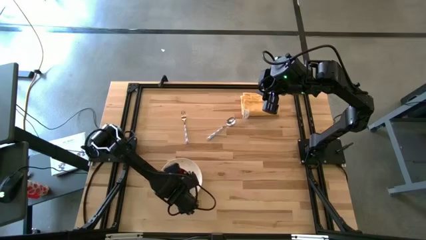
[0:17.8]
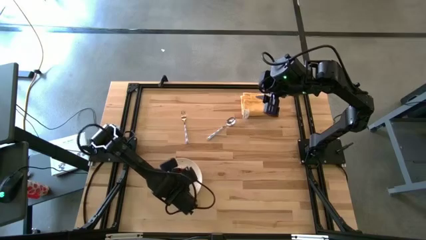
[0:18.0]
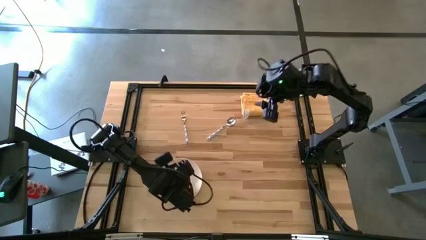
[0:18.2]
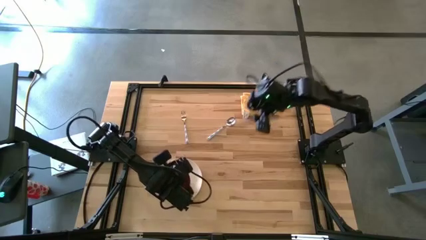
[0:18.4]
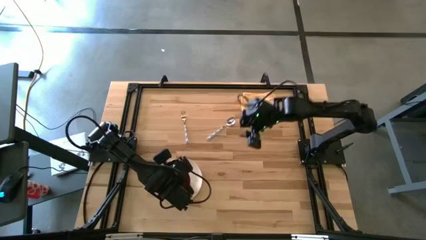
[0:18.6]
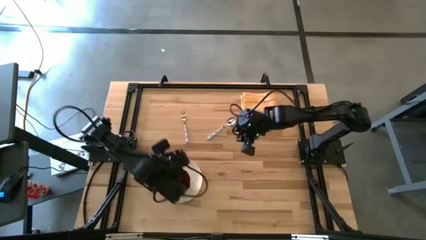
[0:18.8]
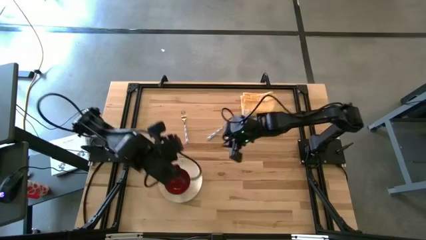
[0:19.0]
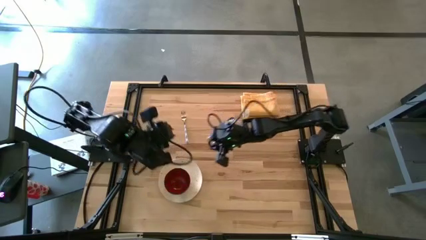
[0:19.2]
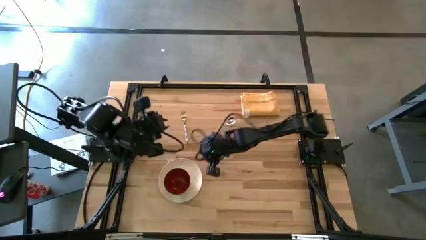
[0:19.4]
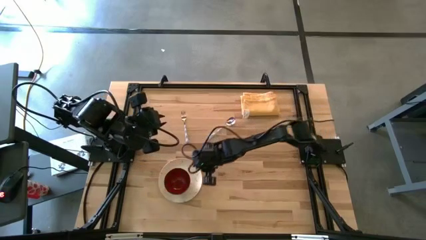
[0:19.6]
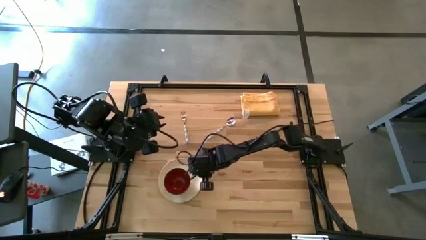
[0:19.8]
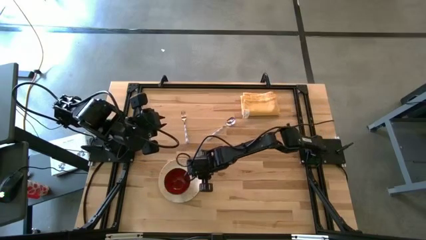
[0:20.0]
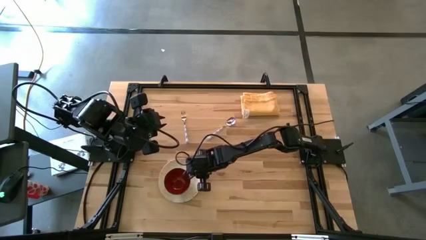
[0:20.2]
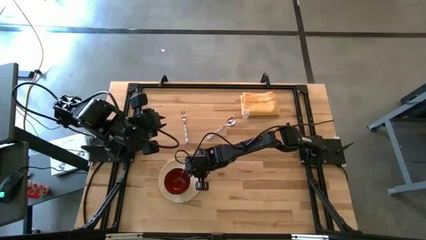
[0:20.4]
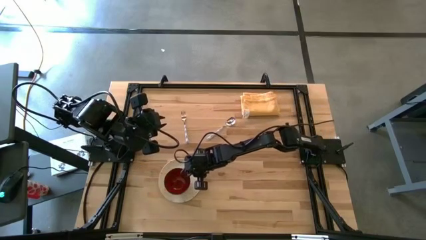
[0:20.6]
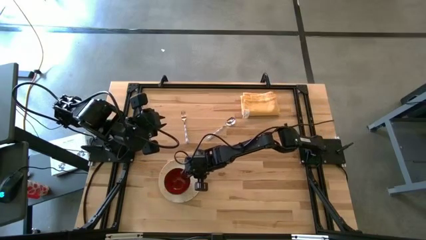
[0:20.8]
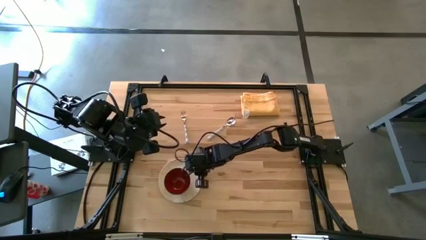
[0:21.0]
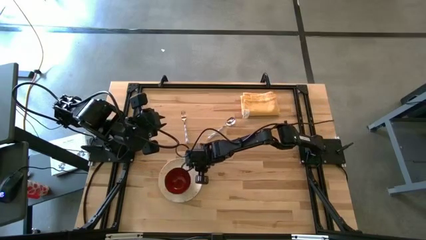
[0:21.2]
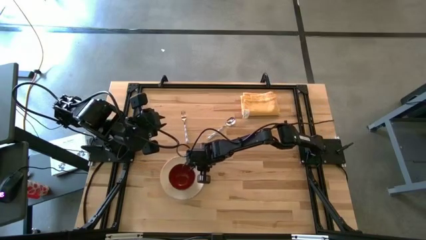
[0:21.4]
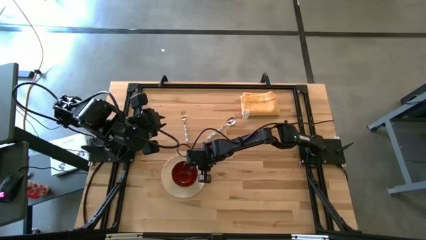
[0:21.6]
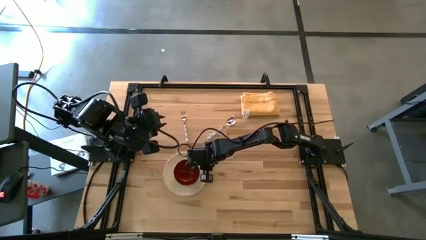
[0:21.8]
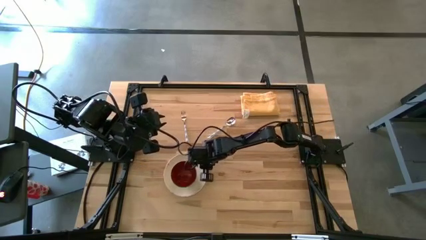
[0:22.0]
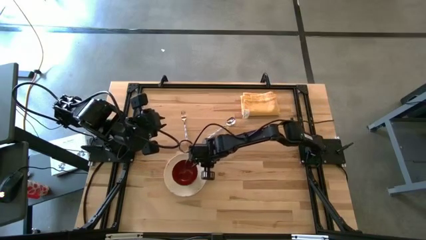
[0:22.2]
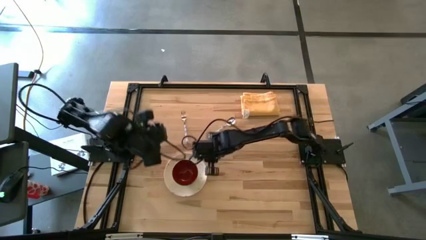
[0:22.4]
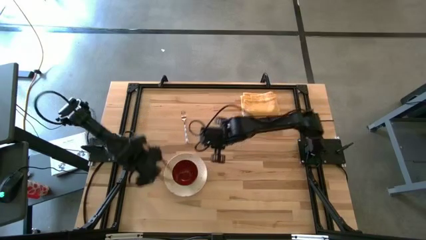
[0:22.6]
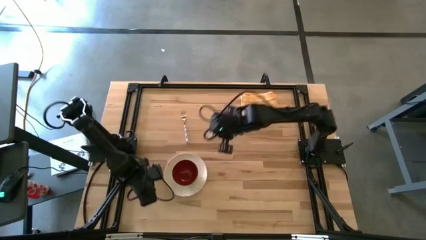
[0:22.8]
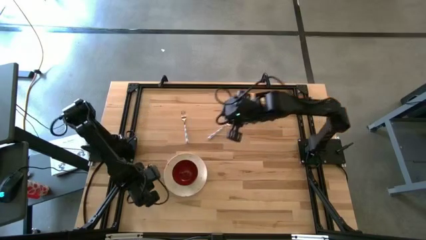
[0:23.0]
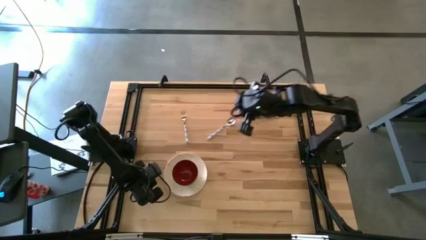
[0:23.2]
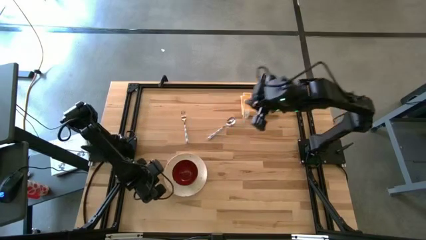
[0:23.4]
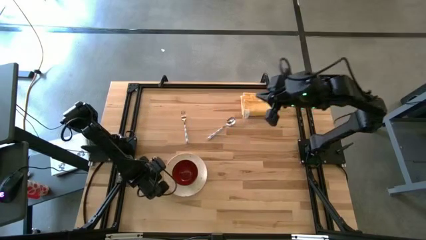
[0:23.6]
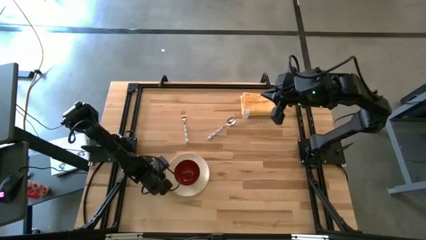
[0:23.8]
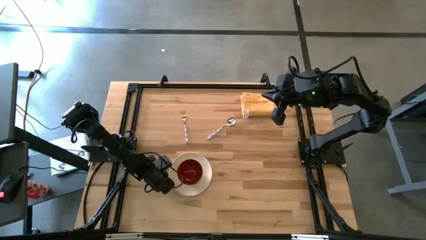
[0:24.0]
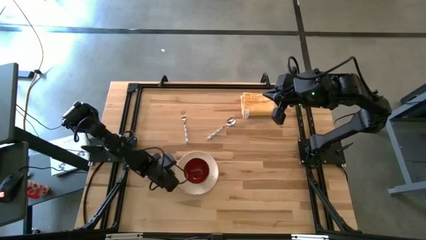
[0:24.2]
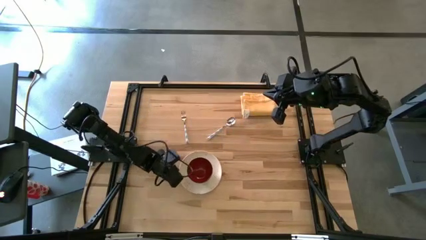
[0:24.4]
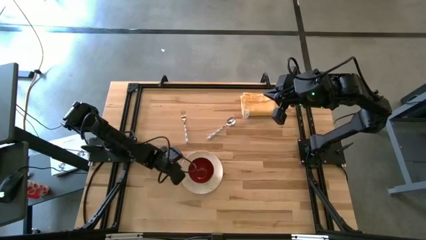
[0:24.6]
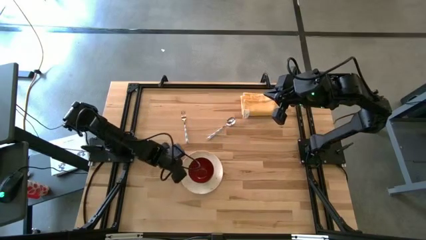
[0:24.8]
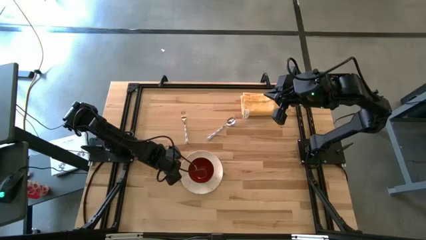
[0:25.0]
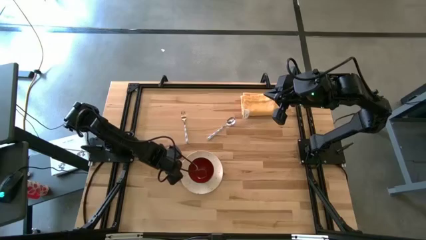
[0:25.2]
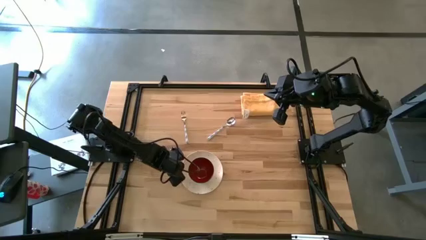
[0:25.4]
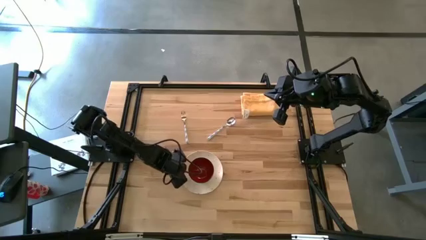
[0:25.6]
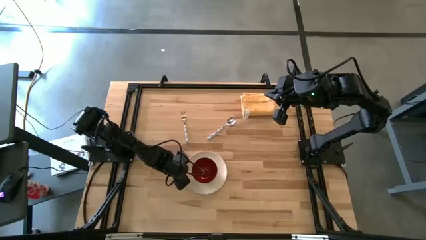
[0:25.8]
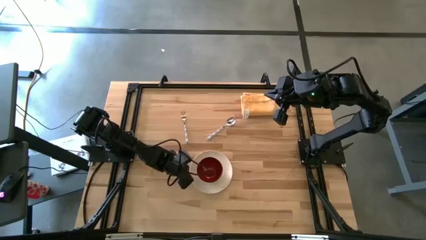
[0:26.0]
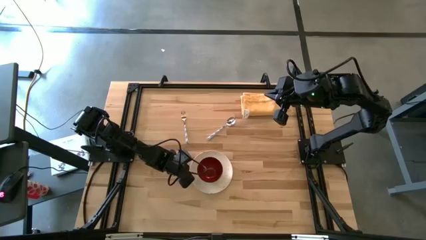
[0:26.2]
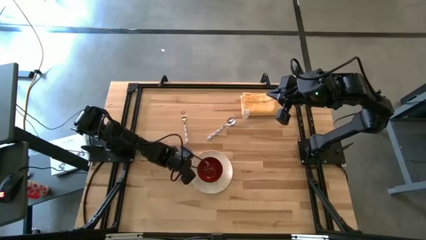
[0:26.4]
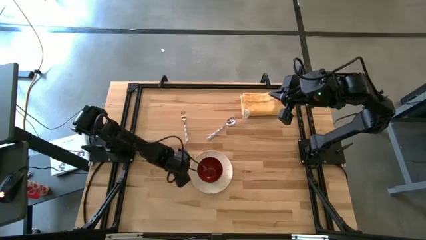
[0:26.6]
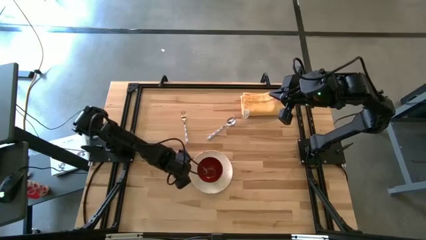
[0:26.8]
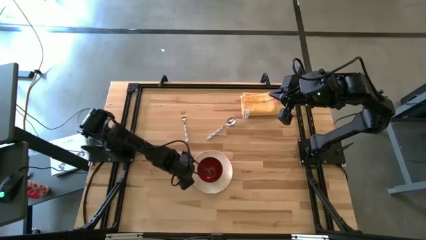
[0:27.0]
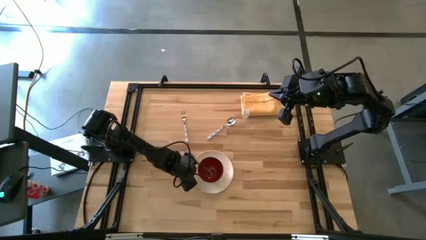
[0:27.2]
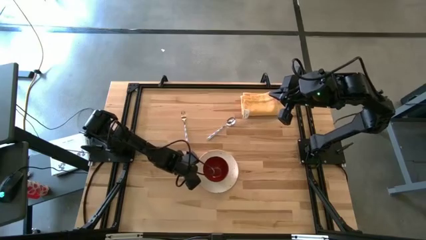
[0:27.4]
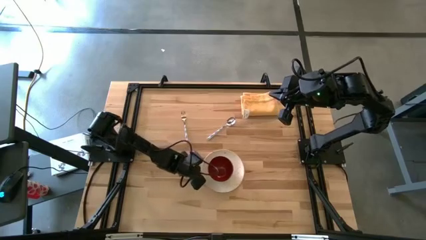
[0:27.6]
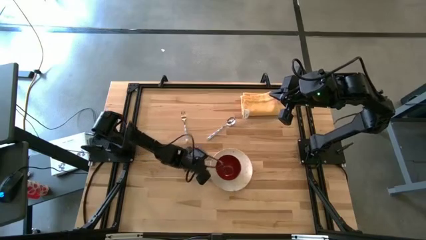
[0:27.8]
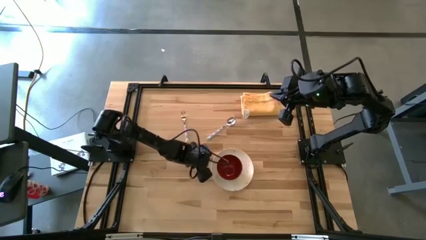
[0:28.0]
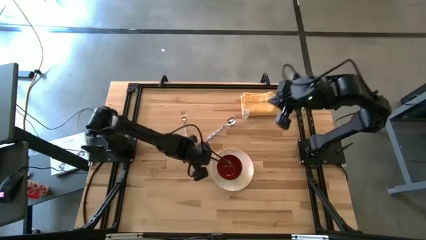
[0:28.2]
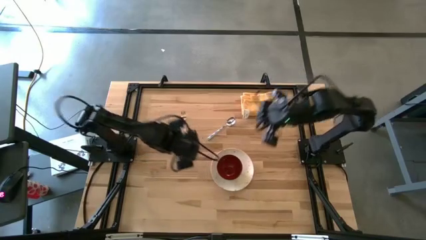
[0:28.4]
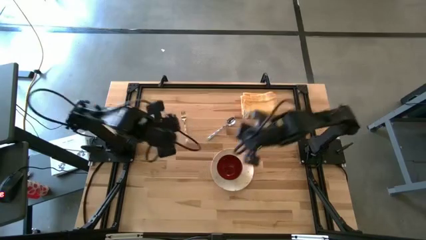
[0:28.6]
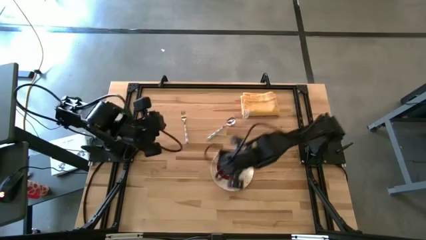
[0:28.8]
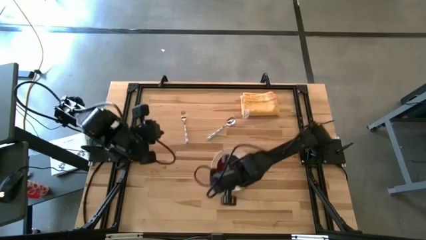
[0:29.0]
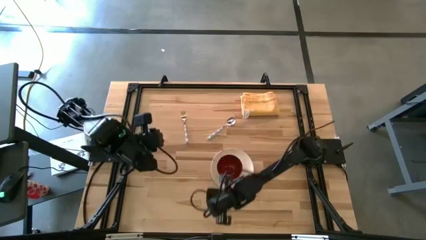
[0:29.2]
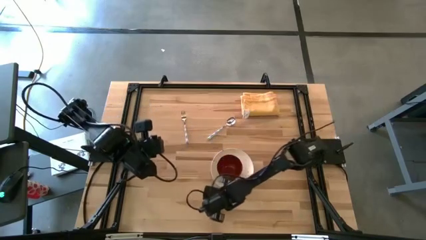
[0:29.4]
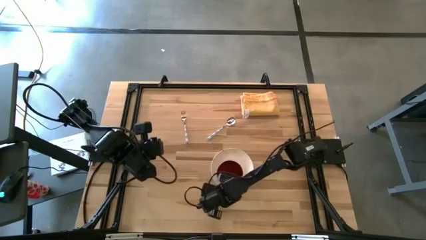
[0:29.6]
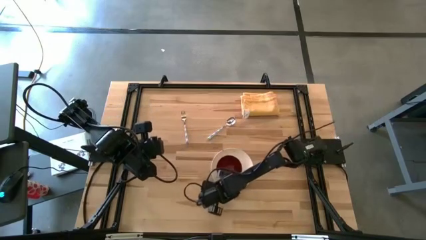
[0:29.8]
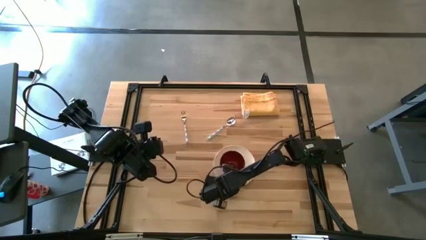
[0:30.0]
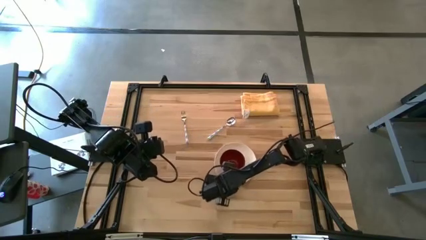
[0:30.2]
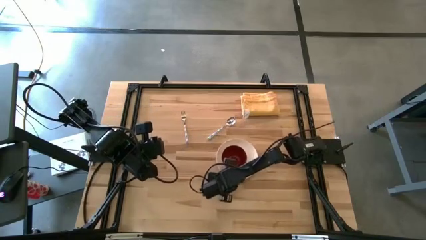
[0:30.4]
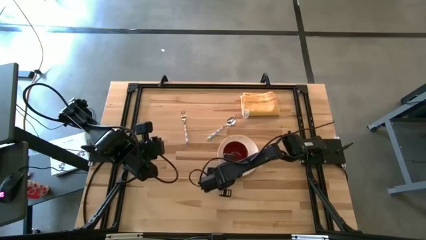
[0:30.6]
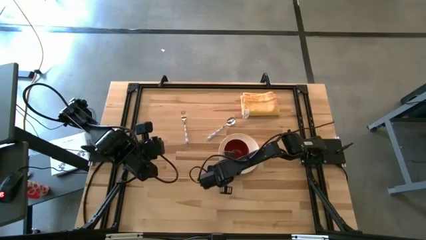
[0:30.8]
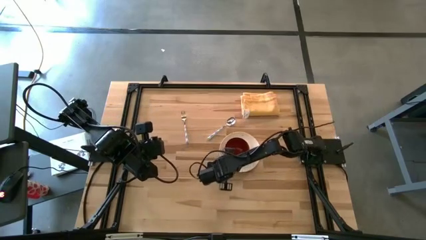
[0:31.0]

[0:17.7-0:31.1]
Task: Set table place
Move the white plate to the middle of the table
